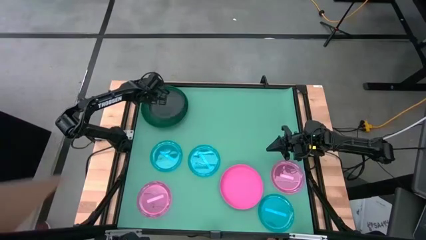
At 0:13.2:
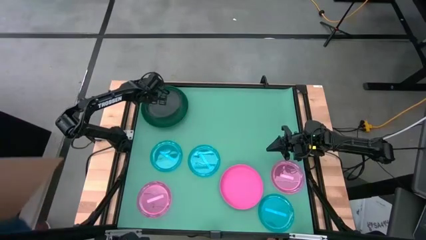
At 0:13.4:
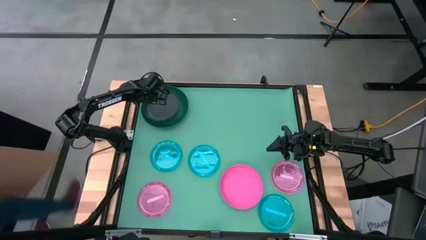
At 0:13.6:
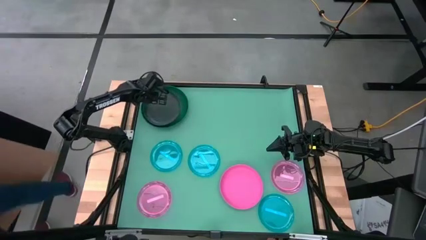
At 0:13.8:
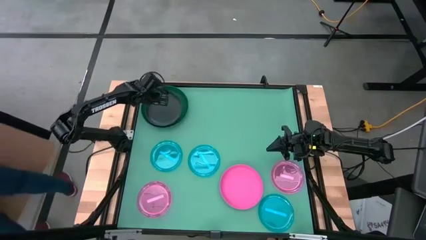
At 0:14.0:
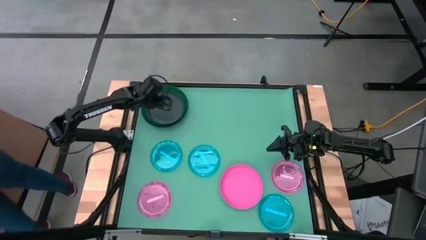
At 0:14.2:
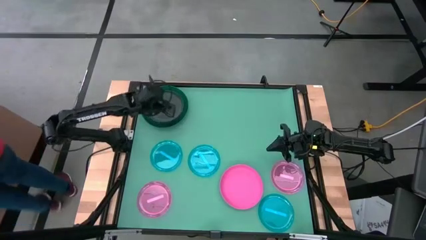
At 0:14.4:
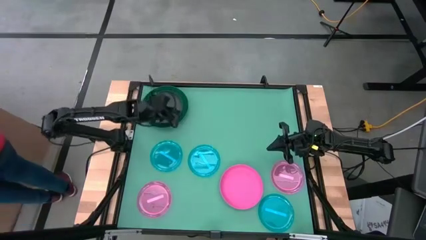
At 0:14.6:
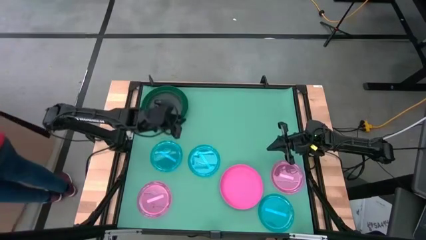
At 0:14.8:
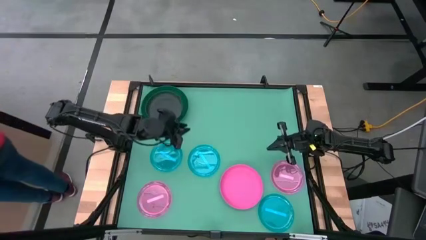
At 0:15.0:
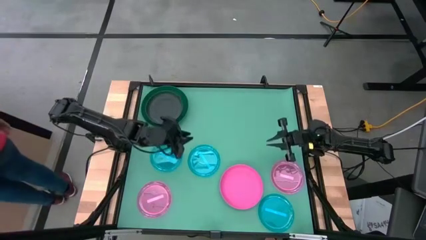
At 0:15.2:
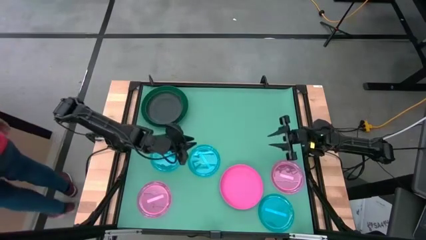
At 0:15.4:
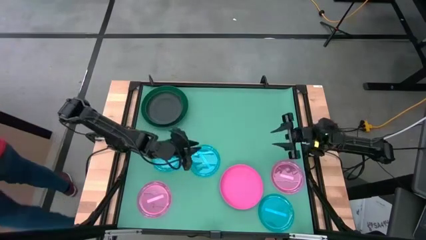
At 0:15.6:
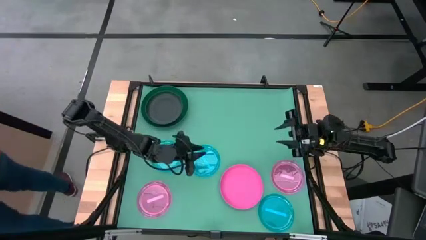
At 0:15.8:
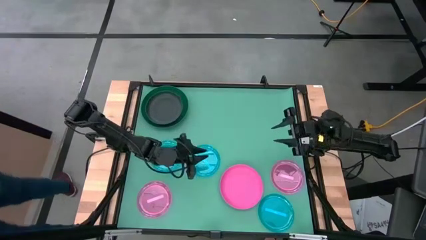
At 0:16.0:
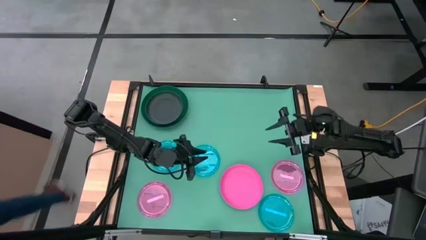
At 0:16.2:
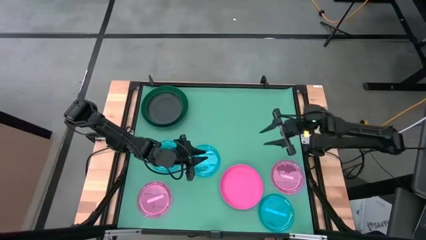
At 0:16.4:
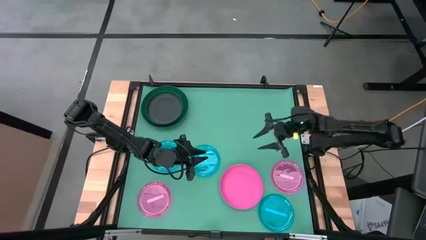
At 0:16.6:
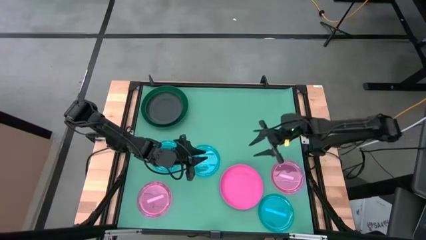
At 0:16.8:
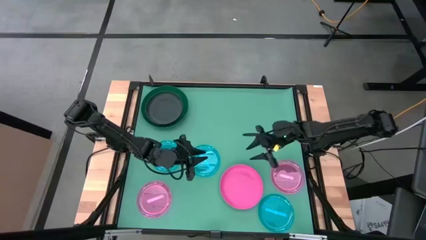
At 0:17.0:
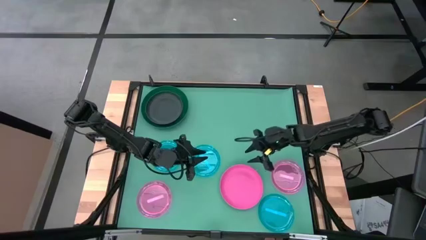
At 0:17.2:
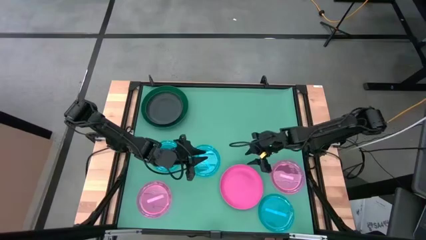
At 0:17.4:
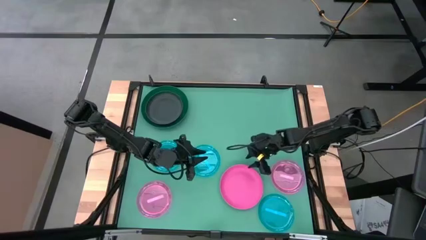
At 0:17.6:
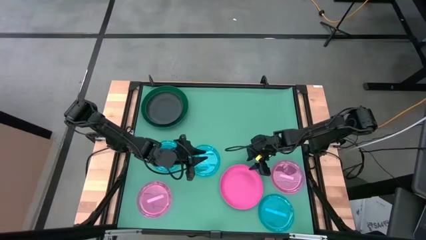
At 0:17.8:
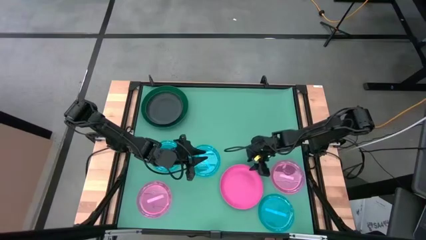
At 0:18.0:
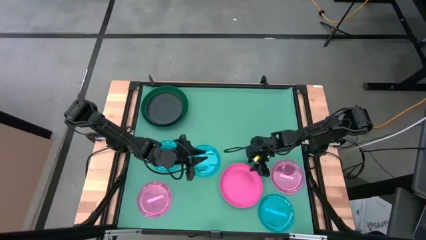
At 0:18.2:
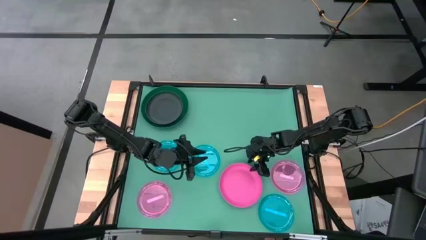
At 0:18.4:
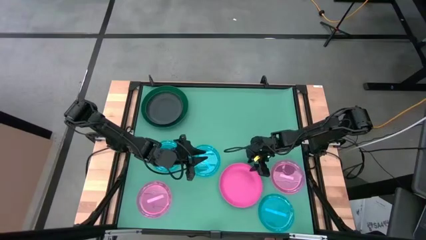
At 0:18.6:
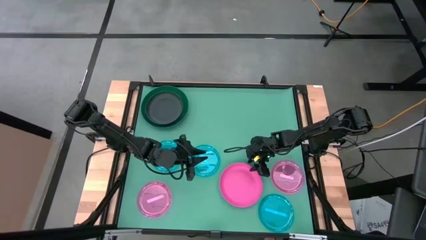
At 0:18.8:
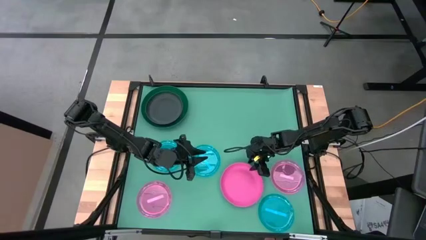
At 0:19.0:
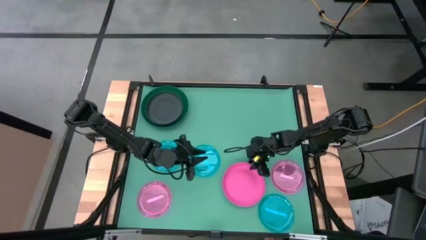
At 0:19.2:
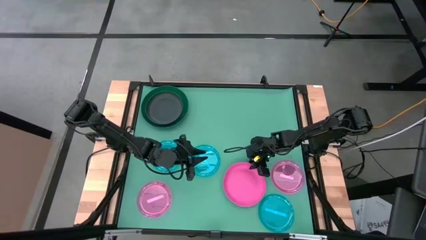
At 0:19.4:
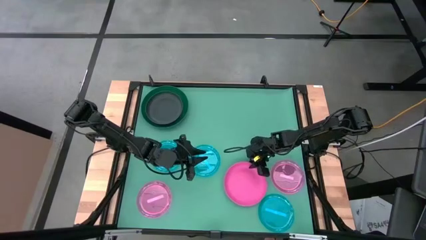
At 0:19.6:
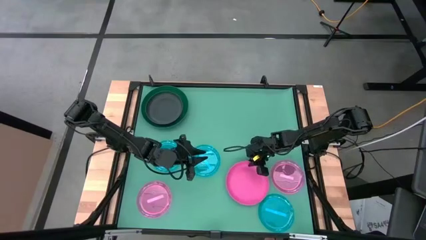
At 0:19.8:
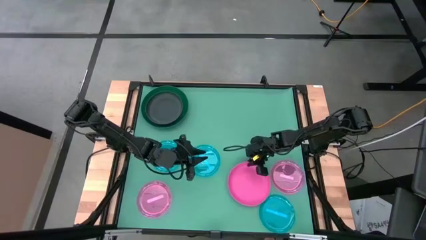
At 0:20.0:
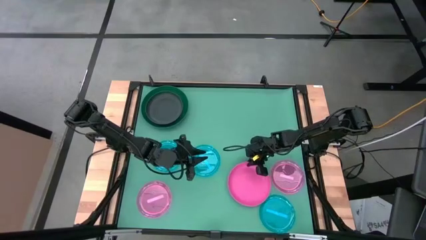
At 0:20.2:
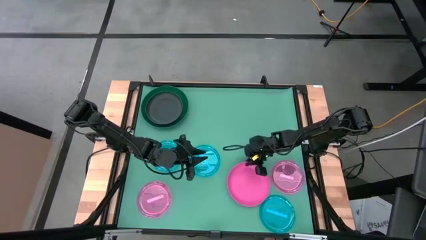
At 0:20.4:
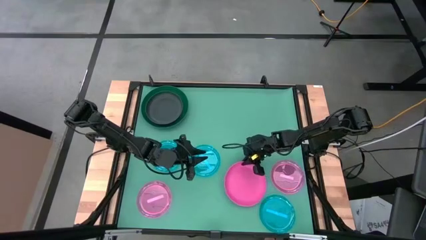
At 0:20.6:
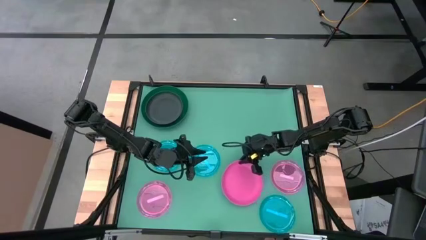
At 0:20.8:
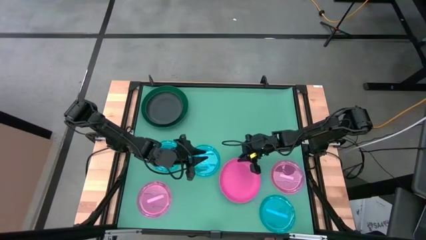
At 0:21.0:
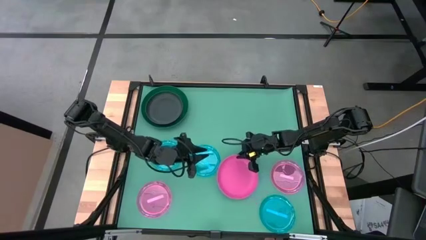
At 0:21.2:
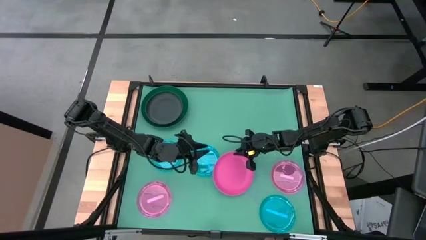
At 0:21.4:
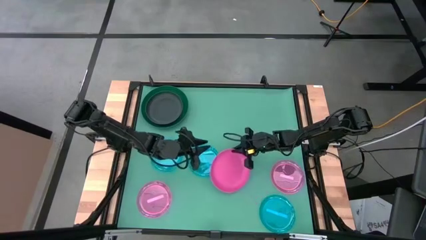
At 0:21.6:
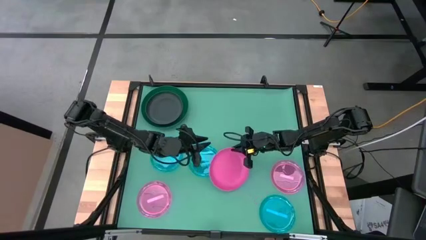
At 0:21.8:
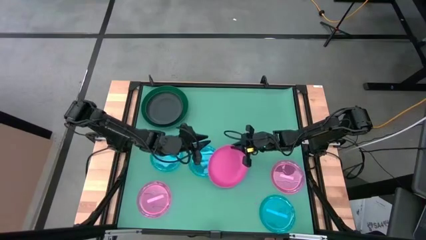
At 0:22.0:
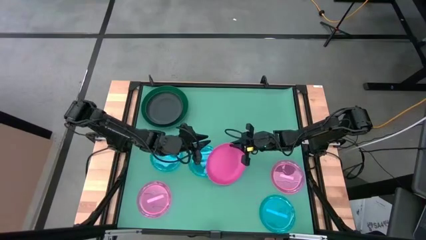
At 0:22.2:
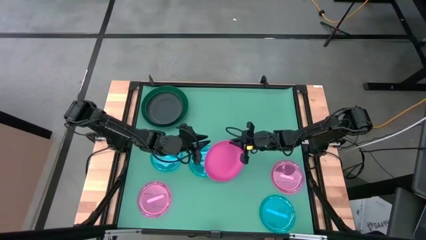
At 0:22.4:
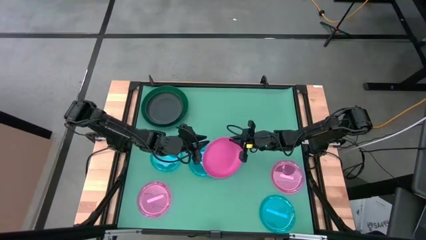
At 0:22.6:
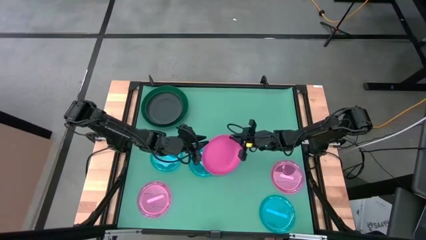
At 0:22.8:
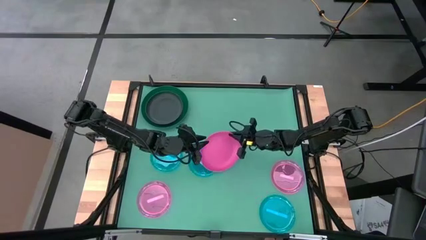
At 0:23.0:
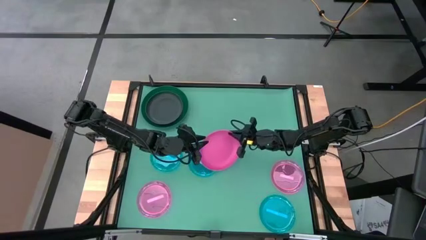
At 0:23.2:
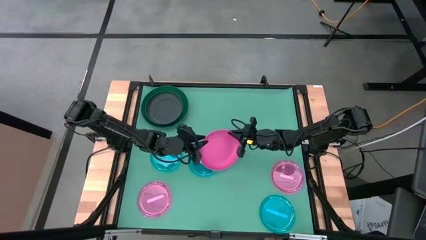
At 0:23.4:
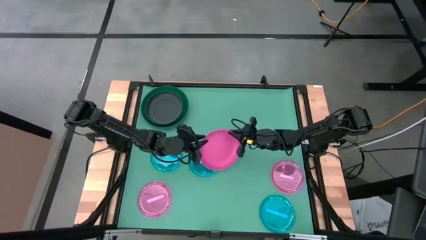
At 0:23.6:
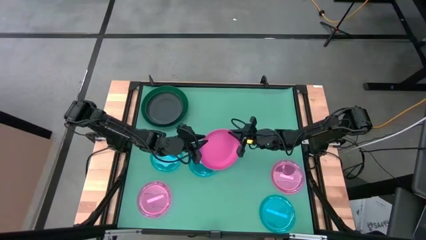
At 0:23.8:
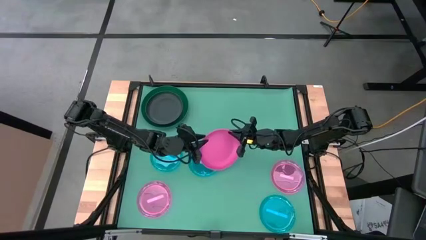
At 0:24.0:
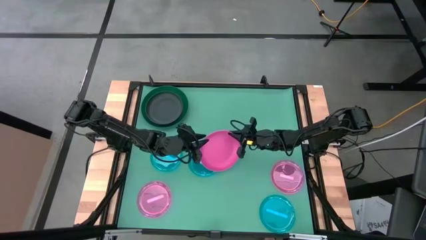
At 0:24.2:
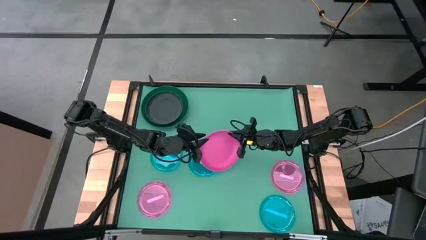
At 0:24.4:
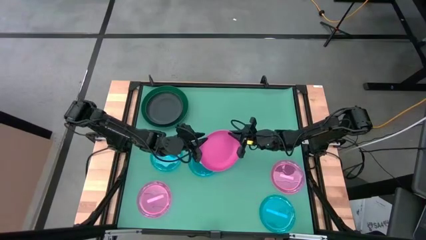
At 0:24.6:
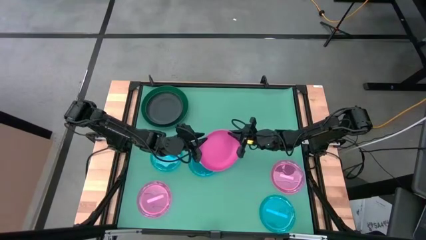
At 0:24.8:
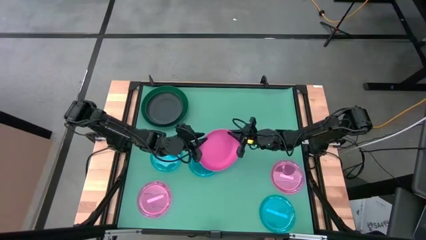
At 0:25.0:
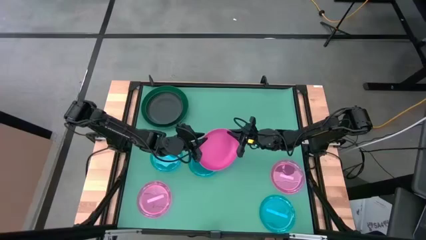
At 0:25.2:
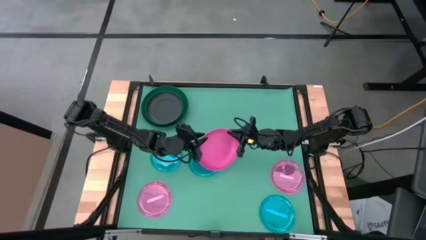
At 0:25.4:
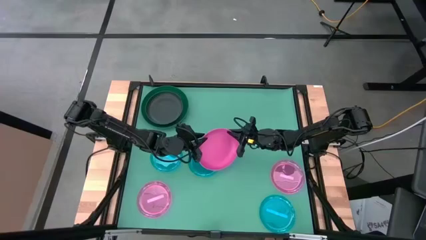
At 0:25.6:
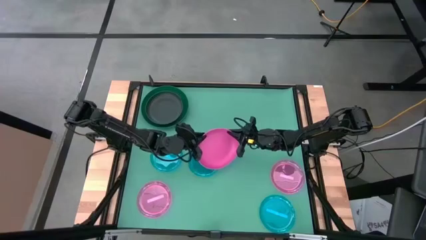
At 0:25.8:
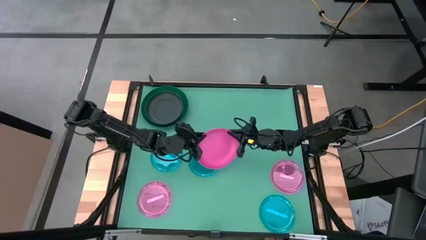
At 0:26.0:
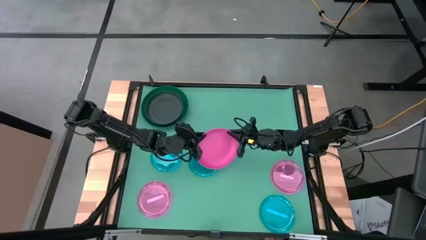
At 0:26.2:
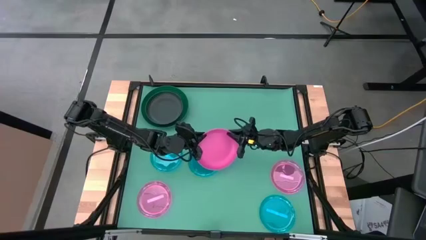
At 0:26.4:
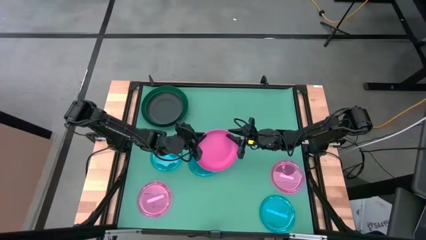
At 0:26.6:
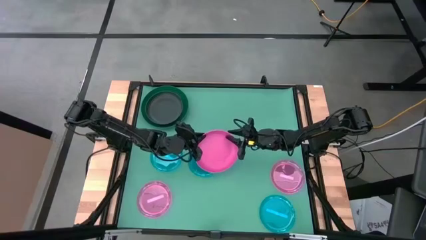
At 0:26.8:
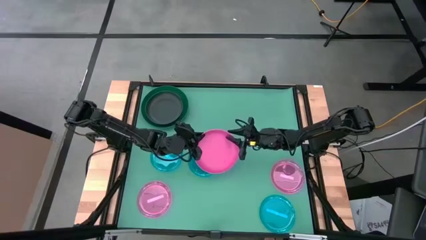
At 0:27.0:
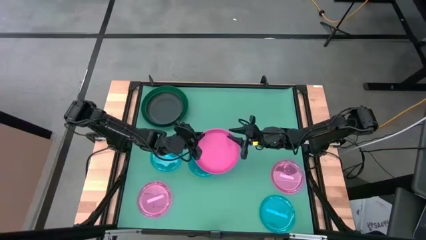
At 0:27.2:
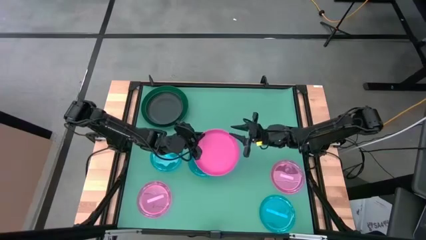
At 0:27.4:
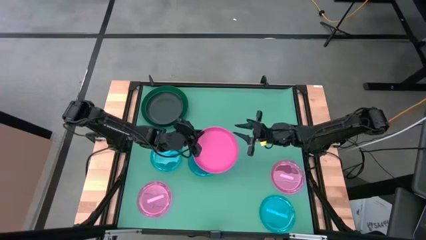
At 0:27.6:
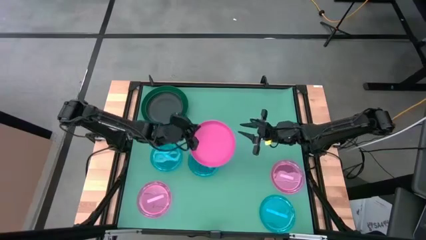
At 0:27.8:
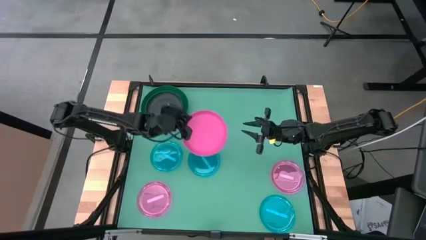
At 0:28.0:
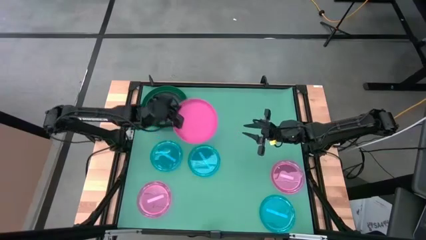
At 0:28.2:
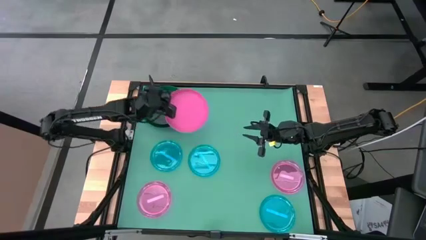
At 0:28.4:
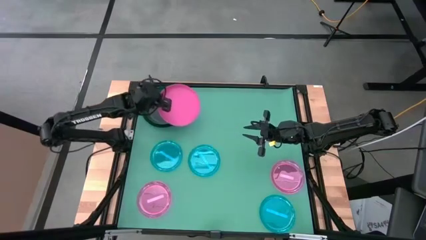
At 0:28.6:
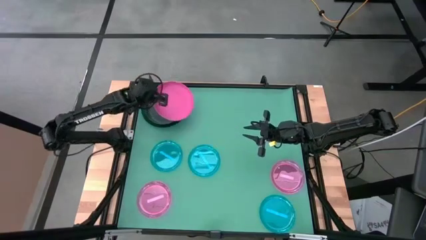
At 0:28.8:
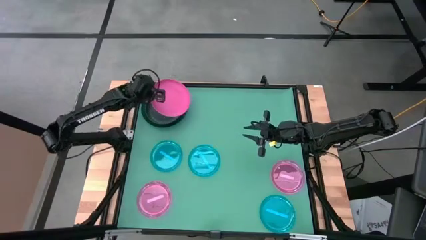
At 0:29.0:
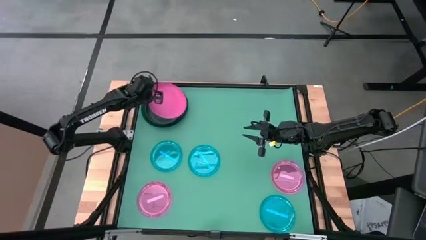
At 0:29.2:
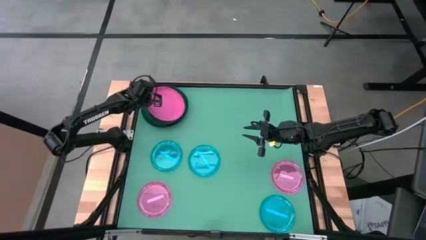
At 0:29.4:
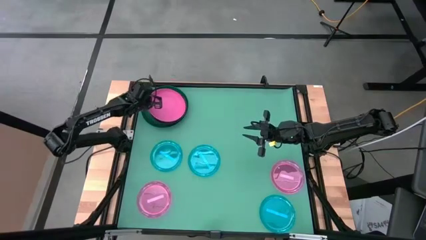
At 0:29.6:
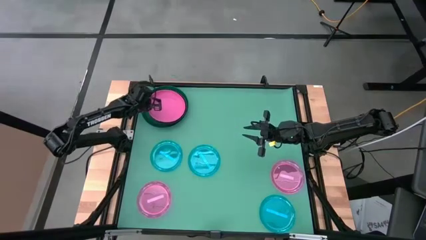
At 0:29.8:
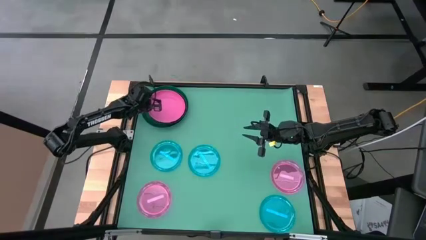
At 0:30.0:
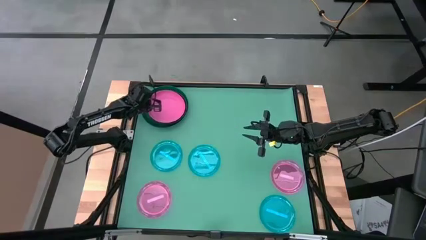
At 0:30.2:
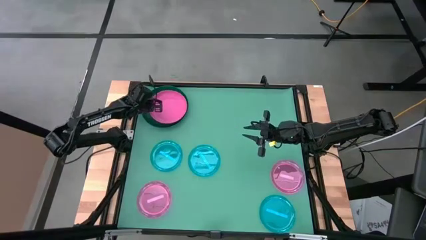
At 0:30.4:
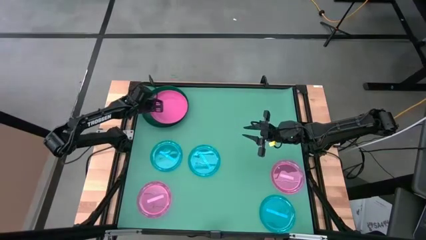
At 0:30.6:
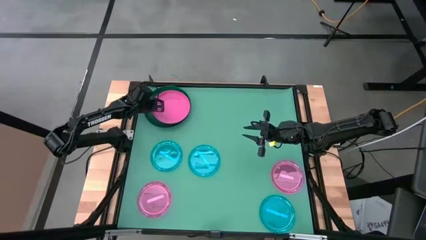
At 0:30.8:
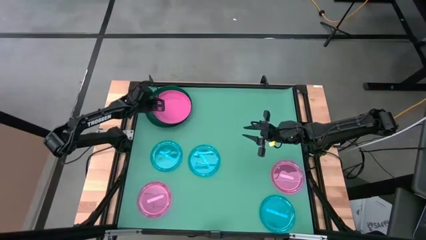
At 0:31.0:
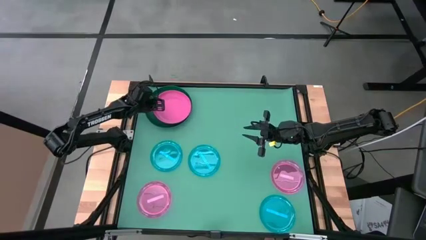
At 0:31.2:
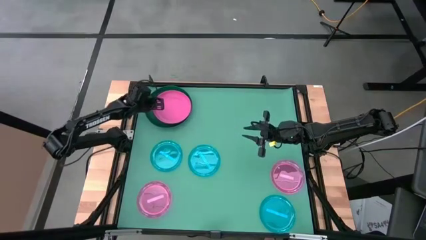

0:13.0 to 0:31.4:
Task: Stack plastic plates
Stack the pink plate on top of the black plate
